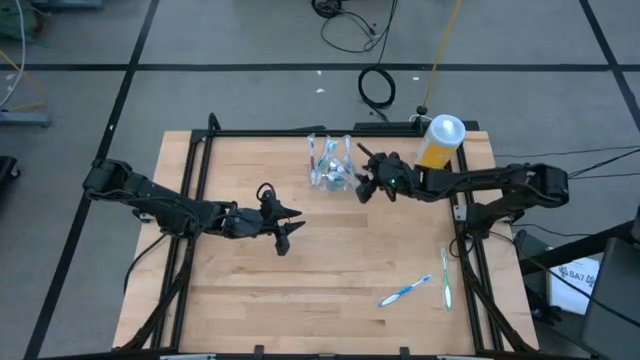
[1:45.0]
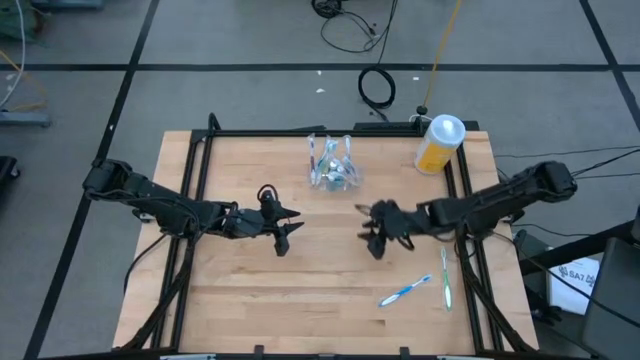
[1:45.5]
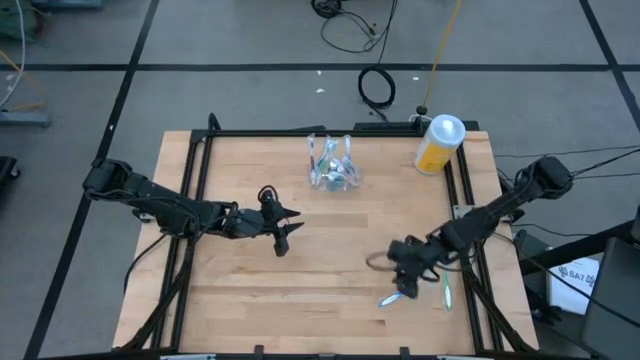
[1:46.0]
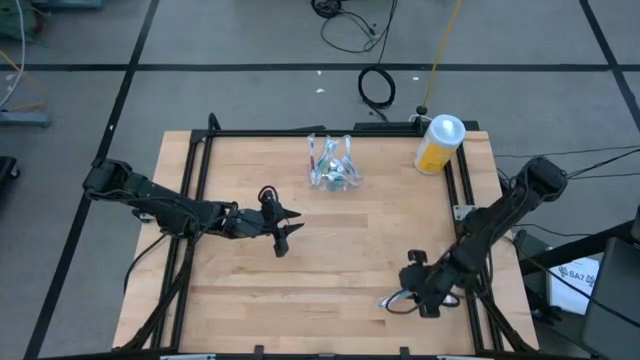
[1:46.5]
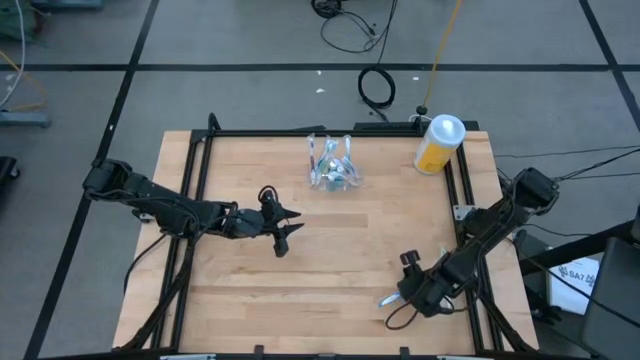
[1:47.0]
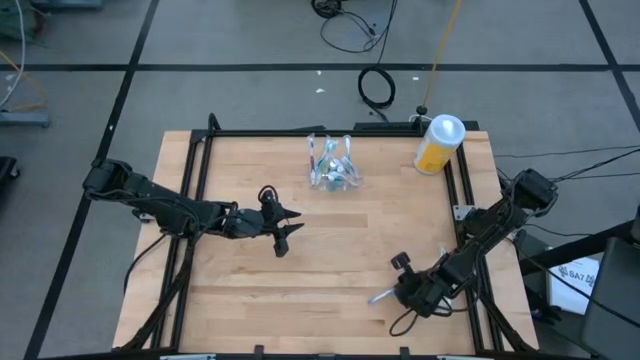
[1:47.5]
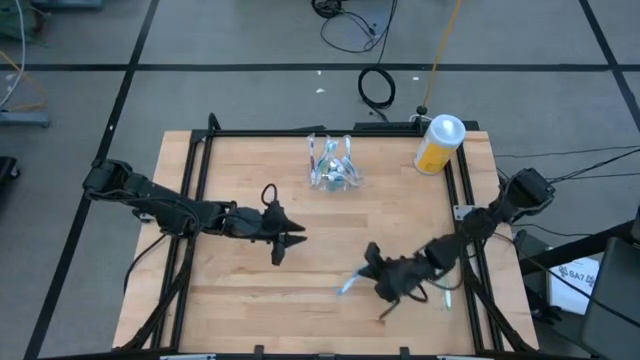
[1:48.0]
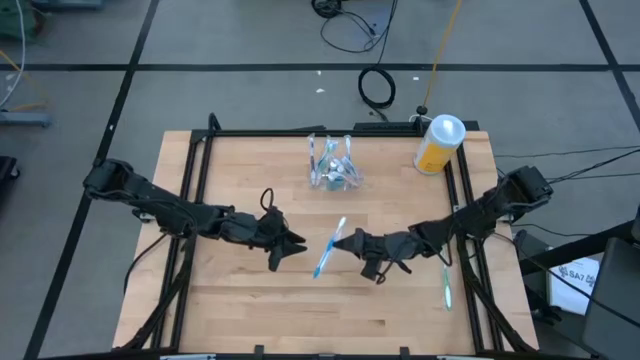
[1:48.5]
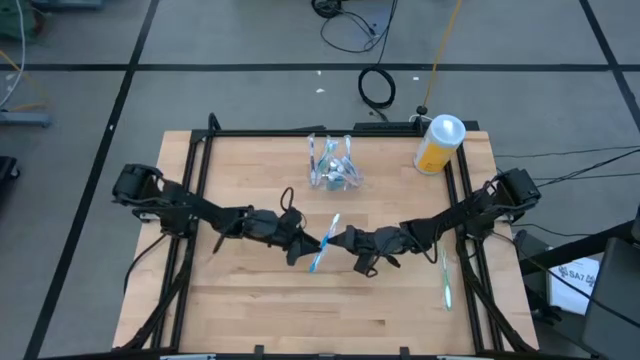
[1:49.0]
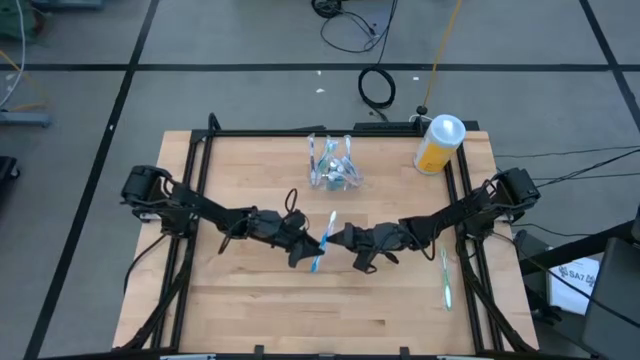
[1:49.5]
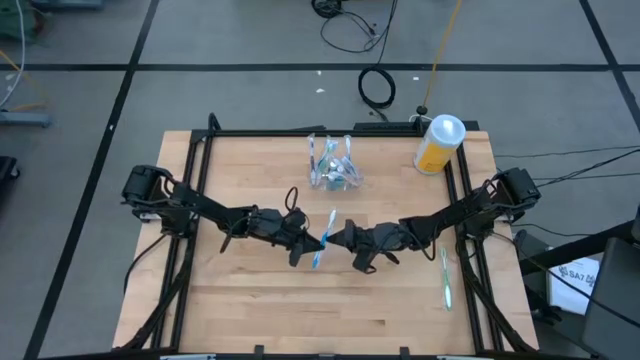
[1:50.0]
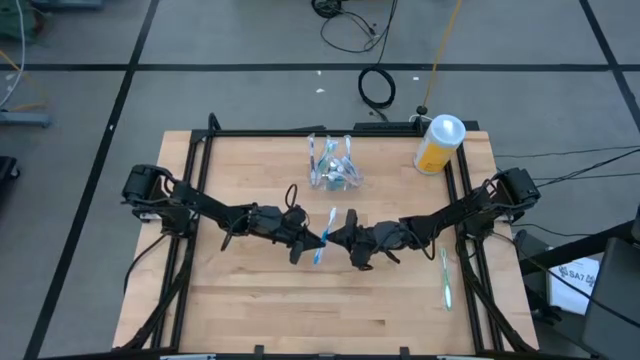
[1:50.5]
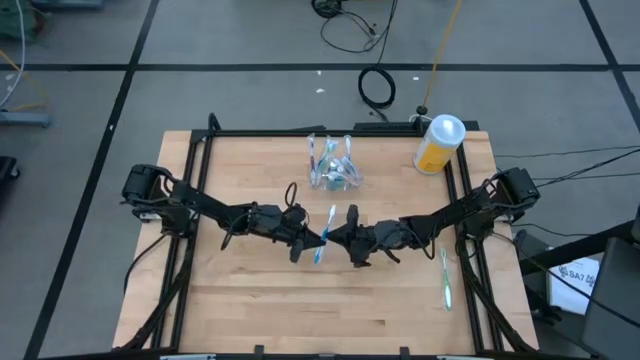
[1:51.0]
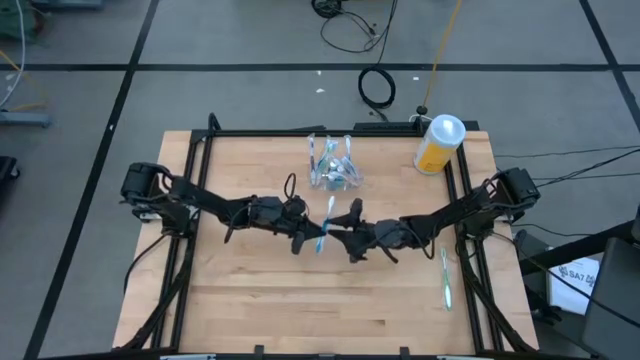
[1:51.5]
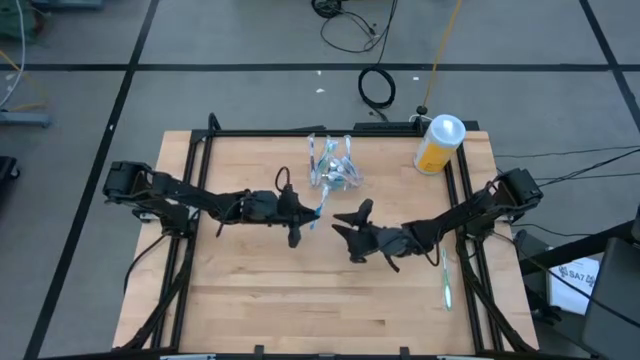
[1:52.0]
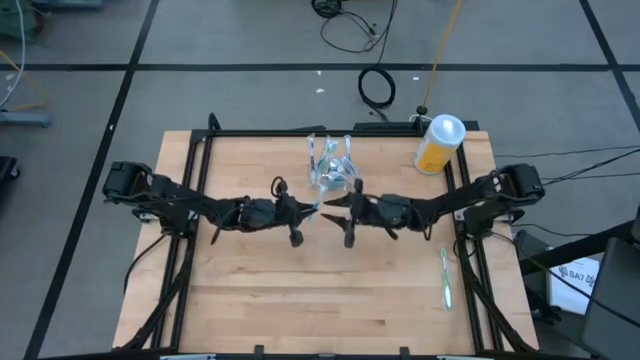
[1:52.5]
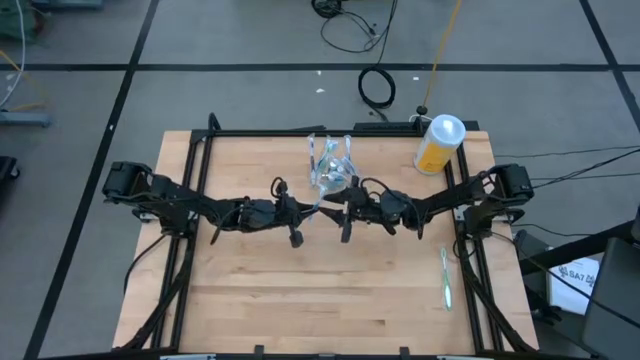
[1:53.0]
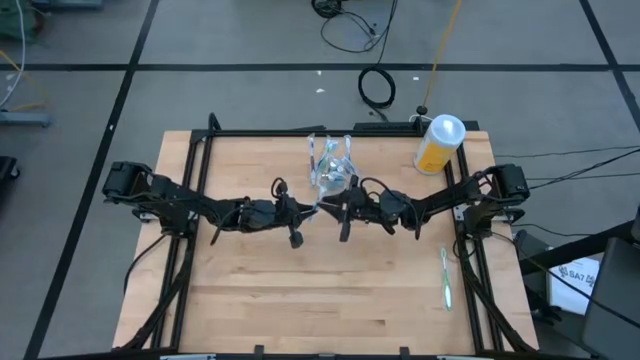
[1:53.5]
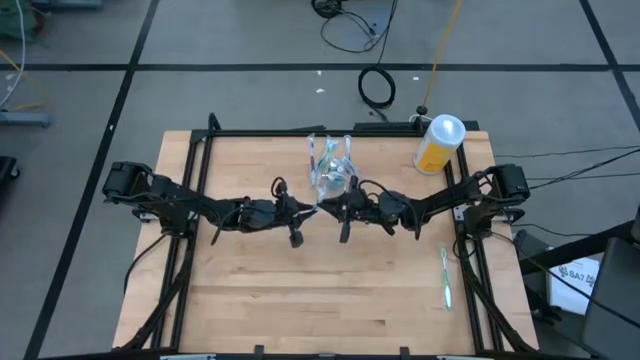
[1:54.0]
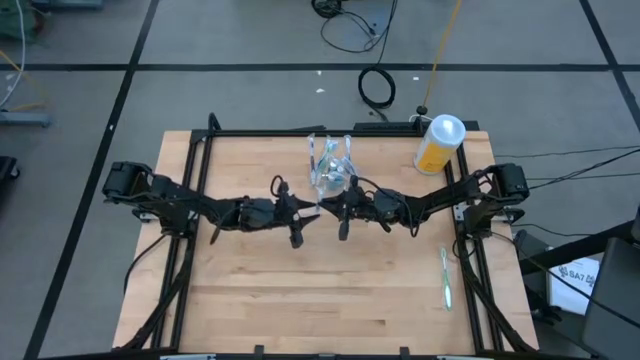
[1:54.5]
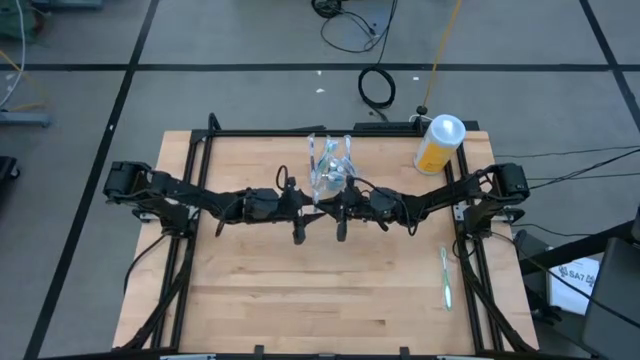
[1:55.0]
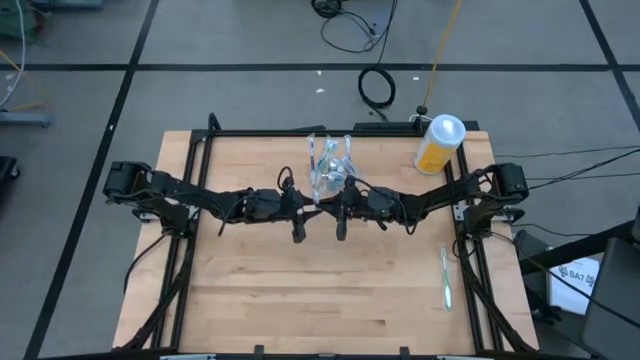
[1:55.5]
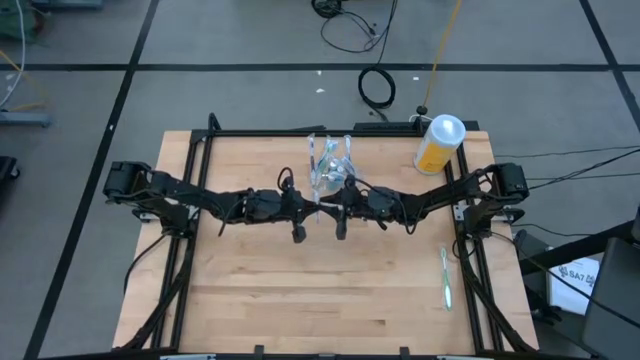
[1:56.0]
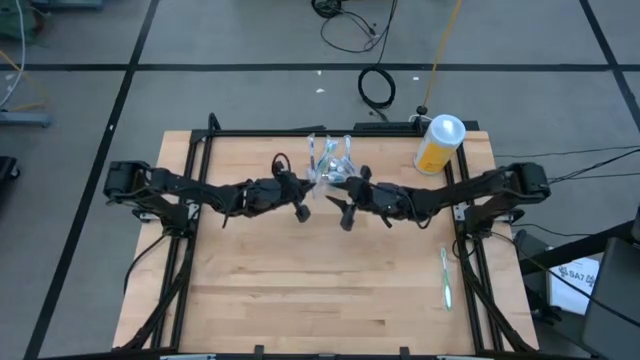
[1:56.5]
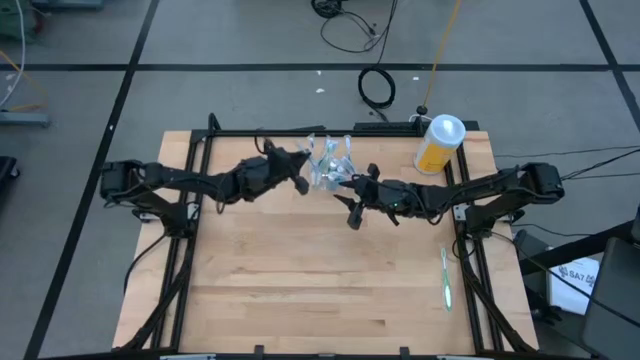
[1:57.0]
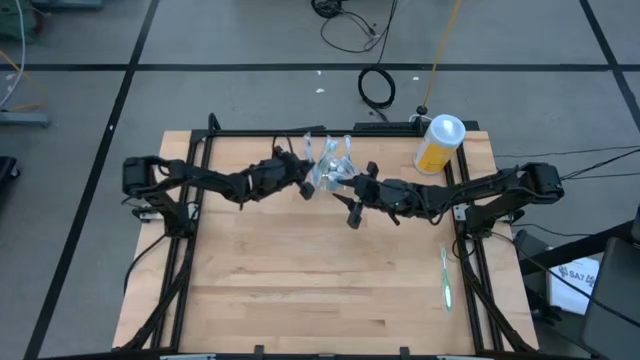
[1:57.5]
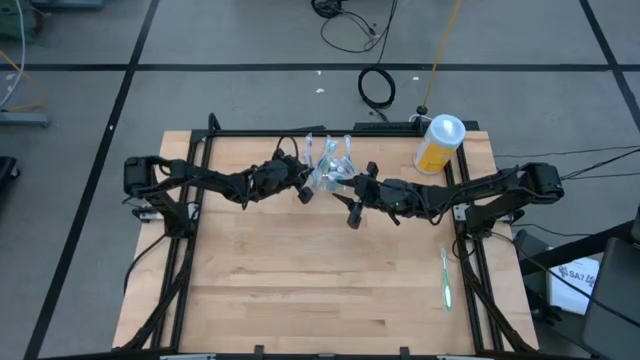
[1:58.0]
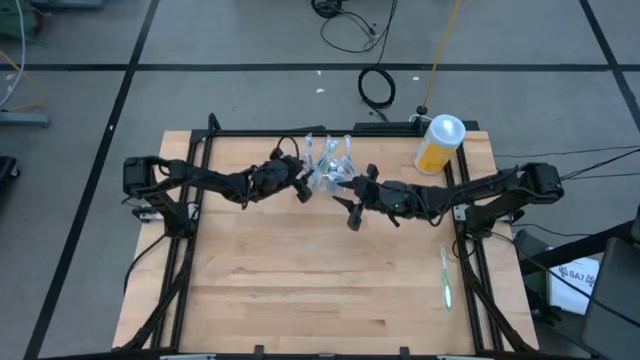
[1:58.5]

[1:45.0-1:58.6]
Task: Pick & Place toothbrushing station
Put the blue toothbrush into the transparent organizer

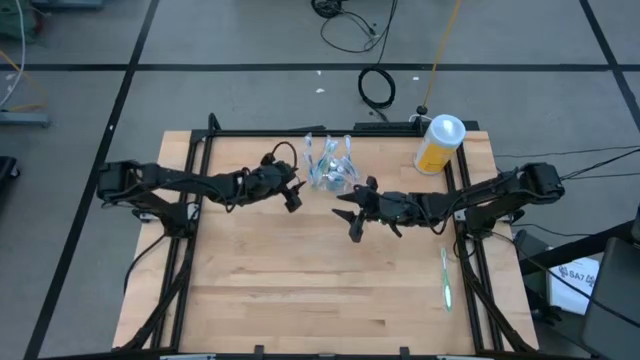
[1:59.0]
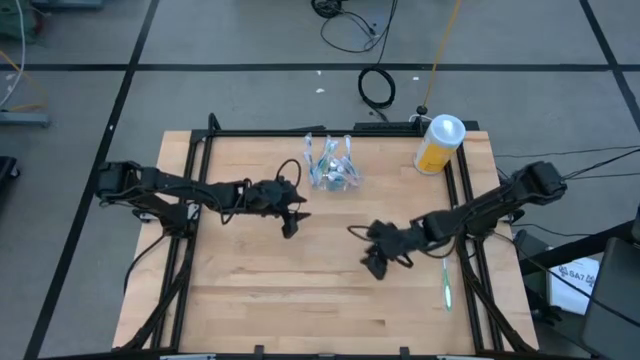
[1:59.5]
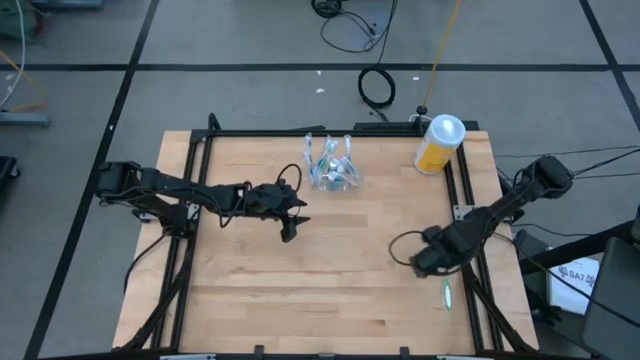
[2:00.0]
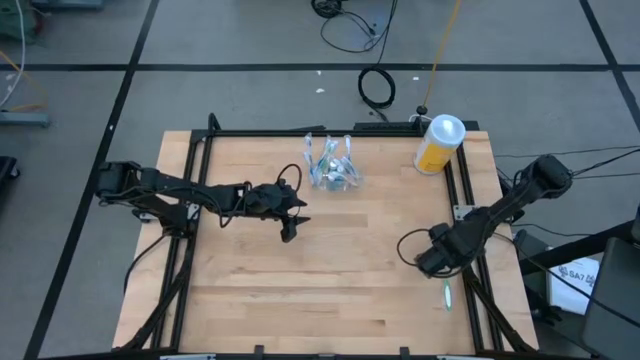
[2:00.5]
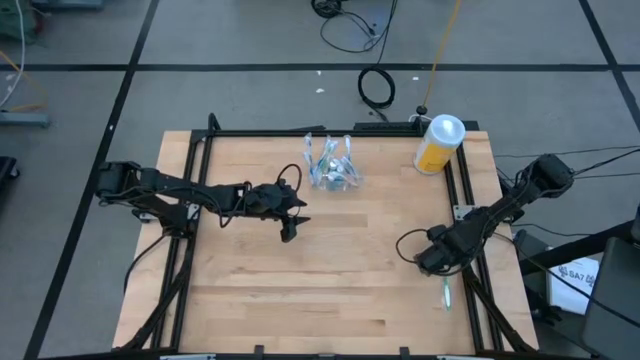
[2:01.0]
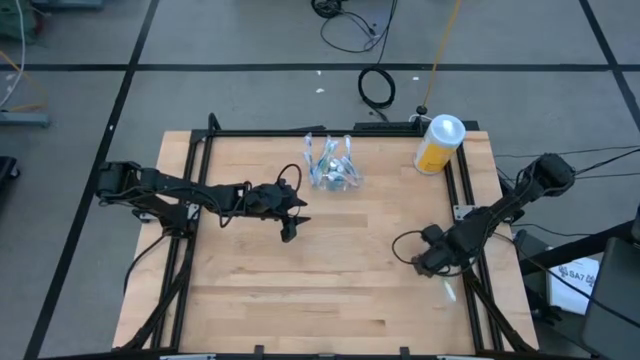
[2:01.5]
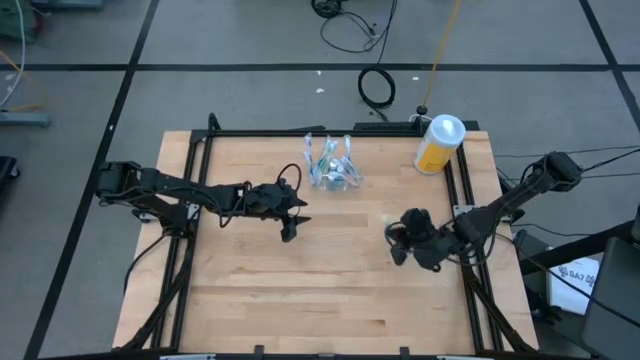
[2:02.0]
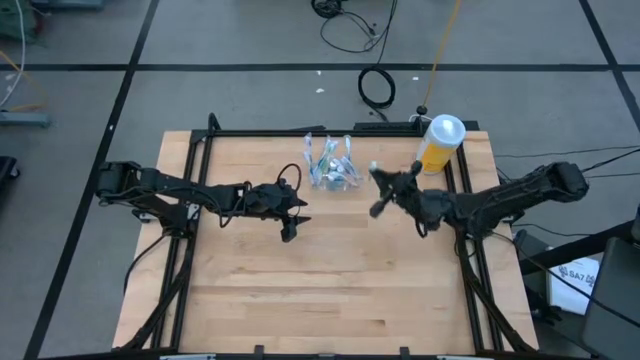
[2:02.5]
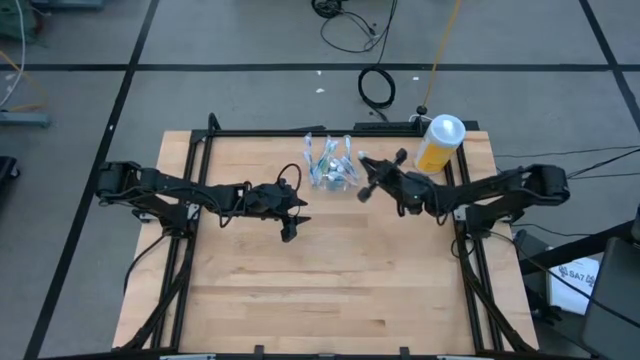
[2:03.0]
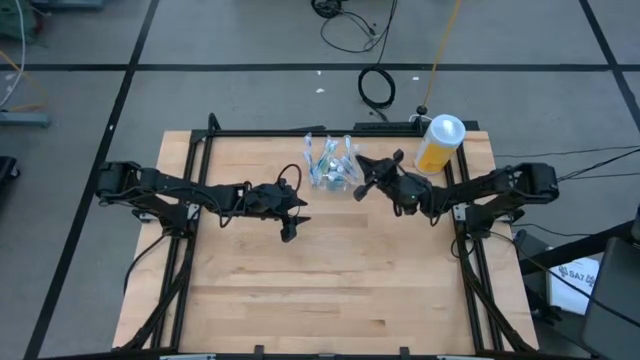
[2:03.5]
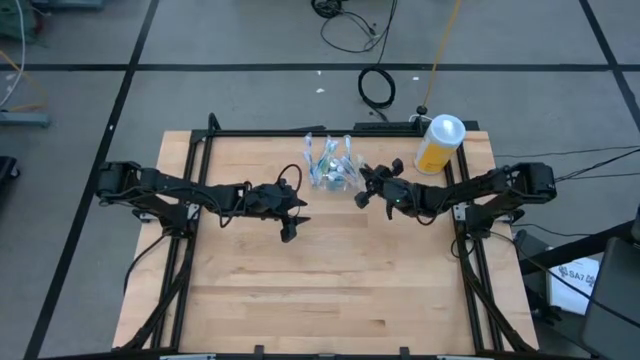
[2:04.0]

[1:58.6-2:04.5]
Put the green toothbrush into the transparent organizer

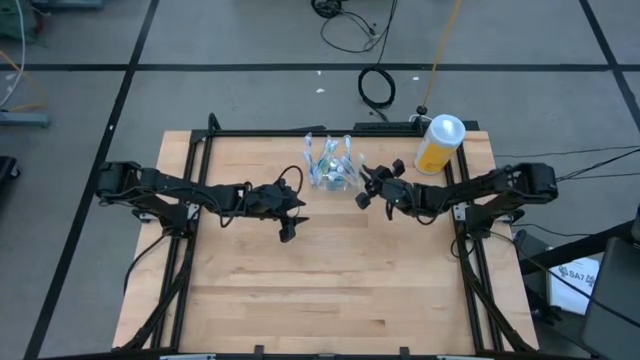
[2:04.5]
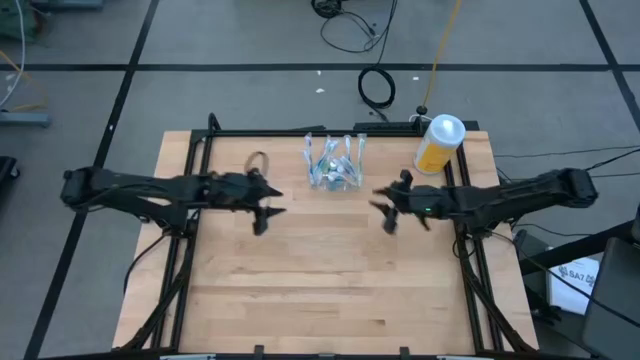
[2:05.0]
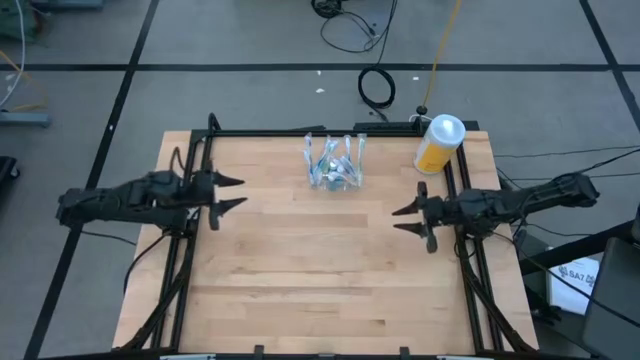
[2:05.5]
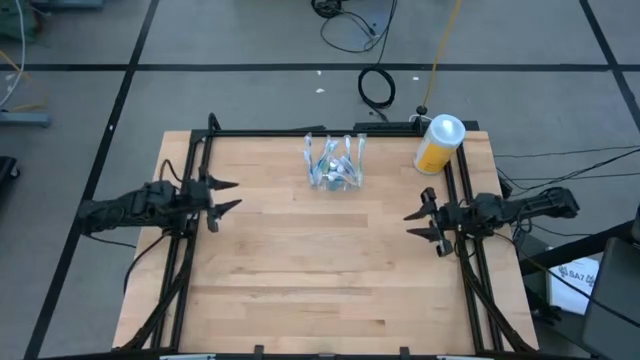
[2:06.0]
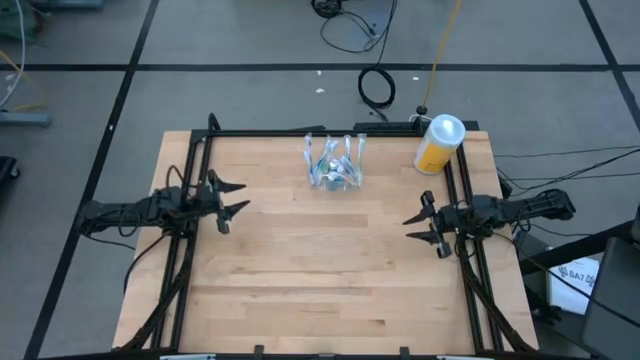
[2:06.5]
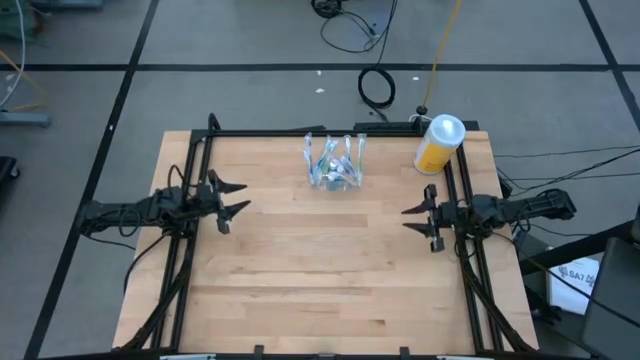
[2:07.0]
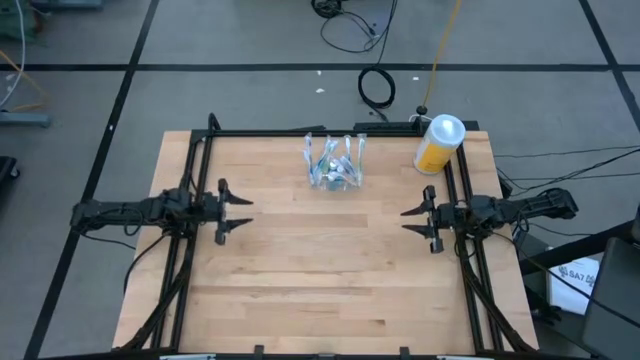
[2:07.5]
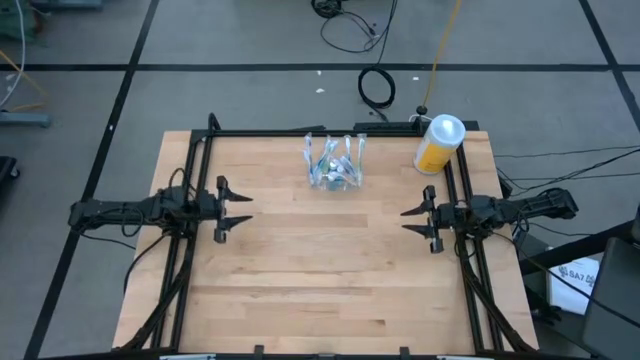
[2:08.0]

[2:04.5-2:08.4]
Return to Home Position
